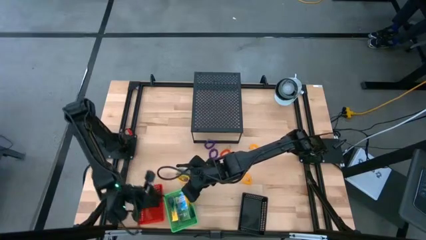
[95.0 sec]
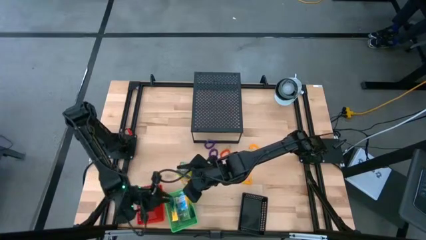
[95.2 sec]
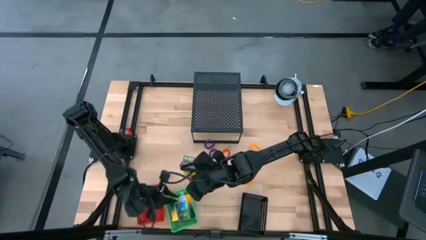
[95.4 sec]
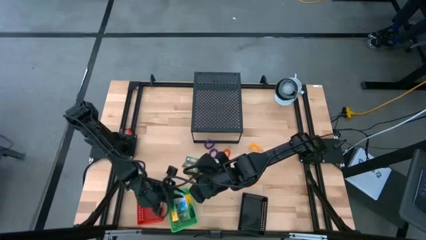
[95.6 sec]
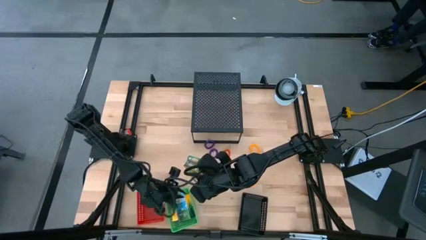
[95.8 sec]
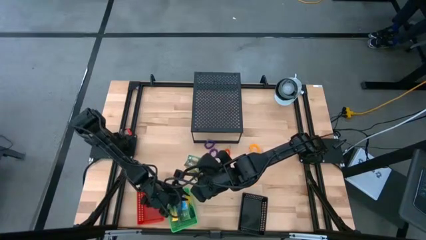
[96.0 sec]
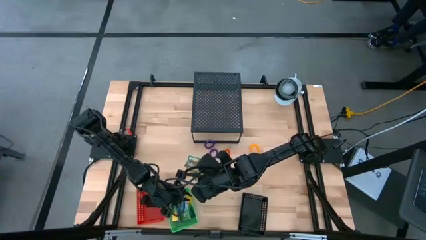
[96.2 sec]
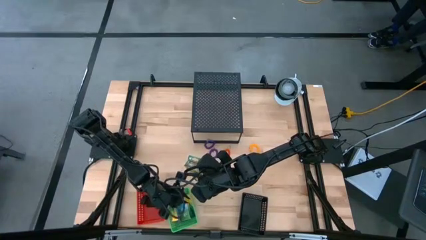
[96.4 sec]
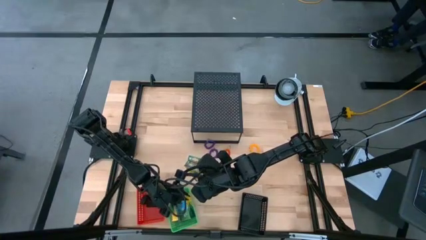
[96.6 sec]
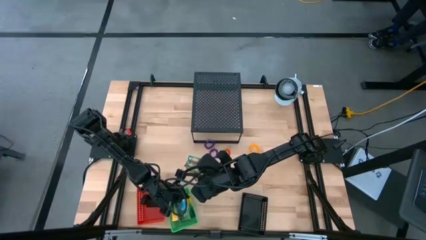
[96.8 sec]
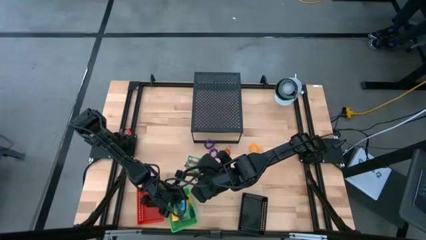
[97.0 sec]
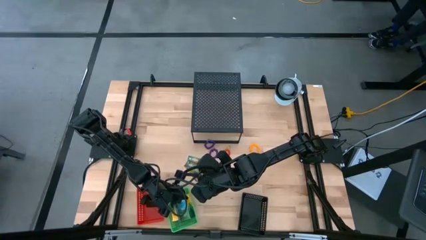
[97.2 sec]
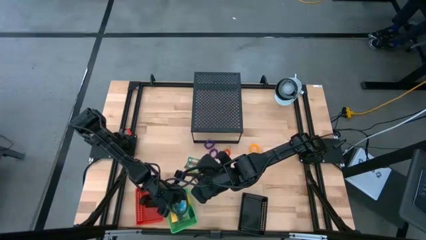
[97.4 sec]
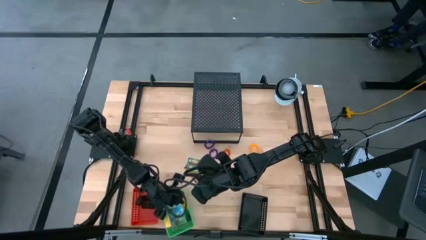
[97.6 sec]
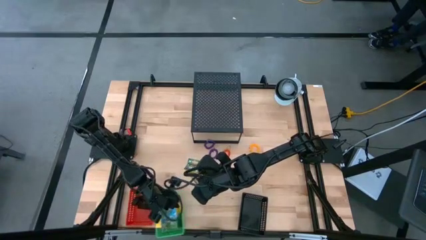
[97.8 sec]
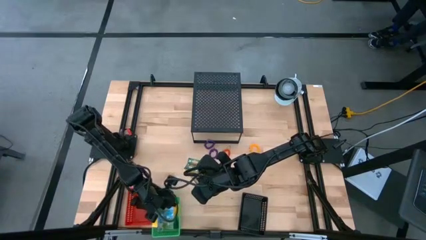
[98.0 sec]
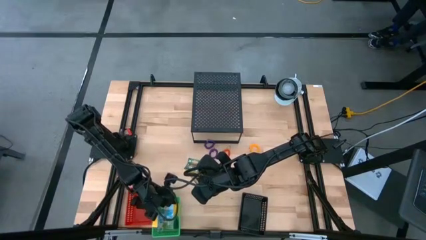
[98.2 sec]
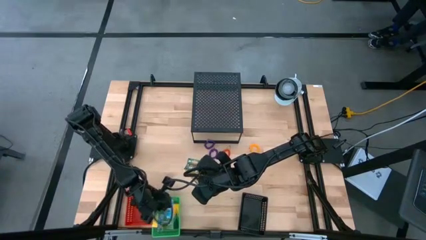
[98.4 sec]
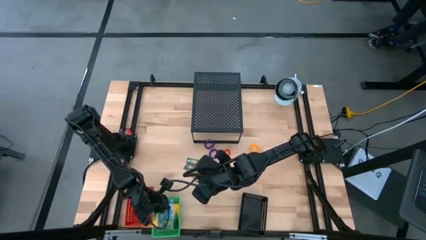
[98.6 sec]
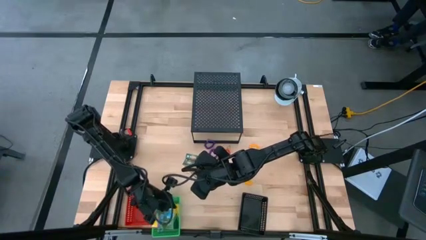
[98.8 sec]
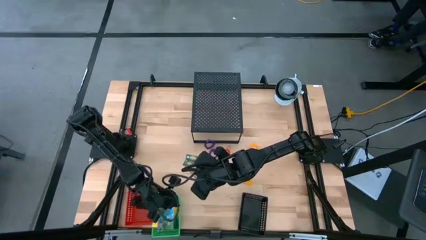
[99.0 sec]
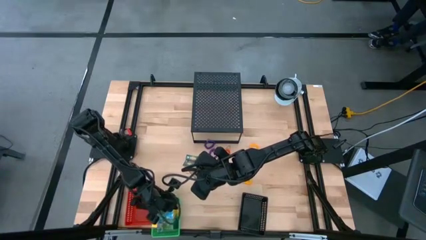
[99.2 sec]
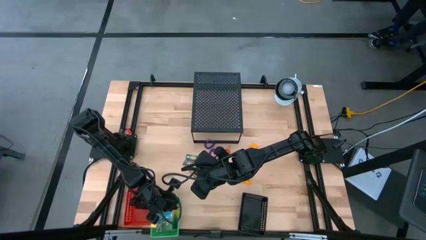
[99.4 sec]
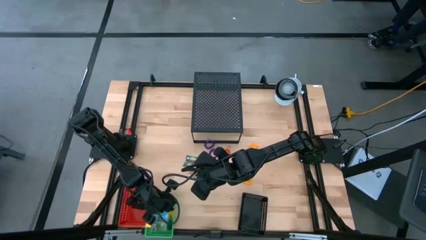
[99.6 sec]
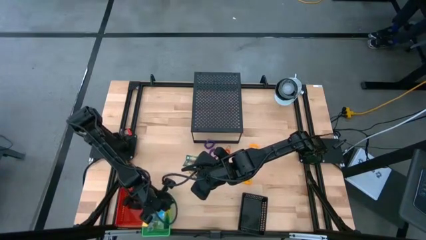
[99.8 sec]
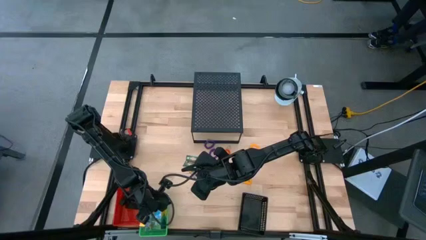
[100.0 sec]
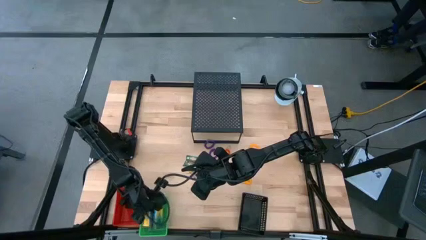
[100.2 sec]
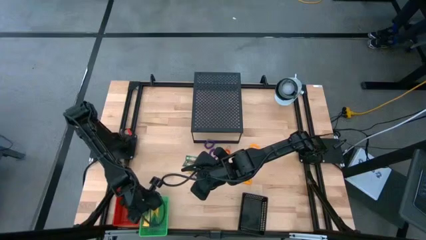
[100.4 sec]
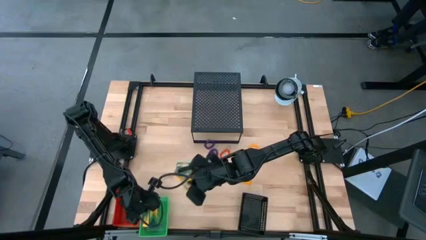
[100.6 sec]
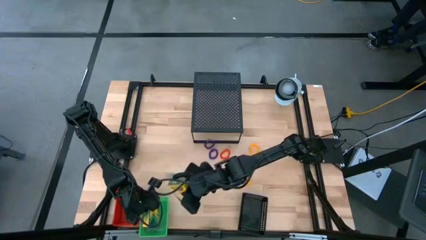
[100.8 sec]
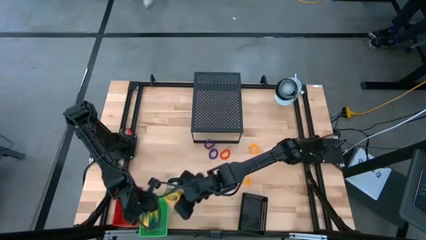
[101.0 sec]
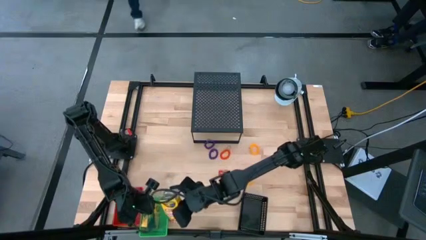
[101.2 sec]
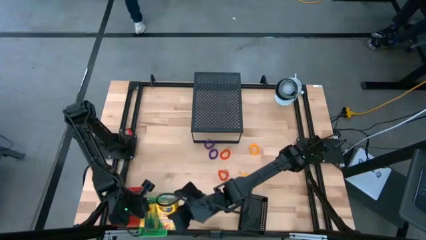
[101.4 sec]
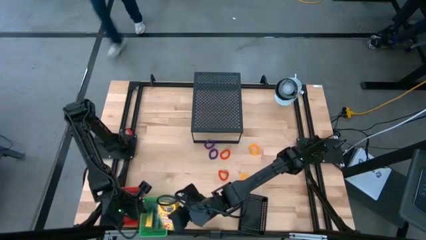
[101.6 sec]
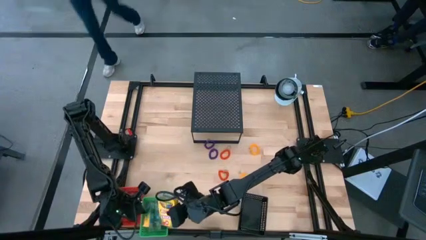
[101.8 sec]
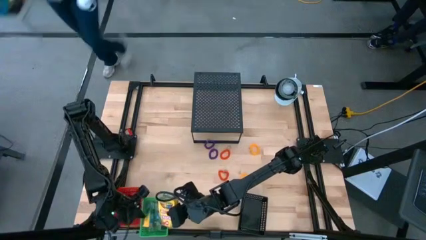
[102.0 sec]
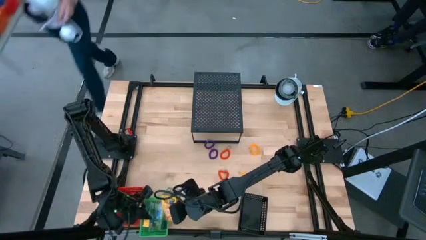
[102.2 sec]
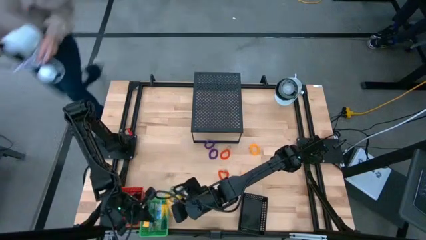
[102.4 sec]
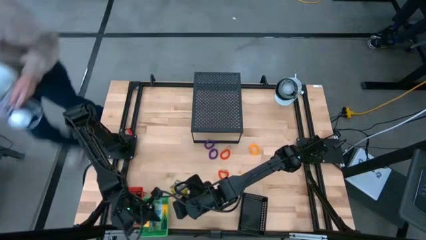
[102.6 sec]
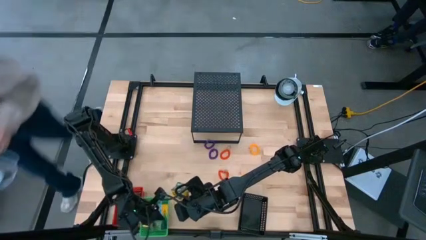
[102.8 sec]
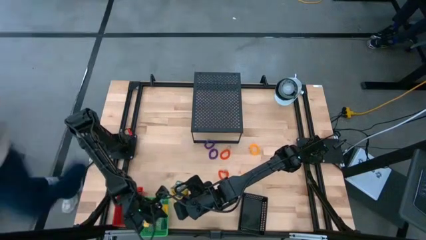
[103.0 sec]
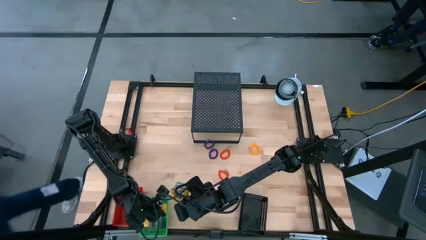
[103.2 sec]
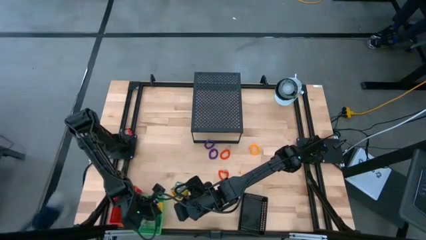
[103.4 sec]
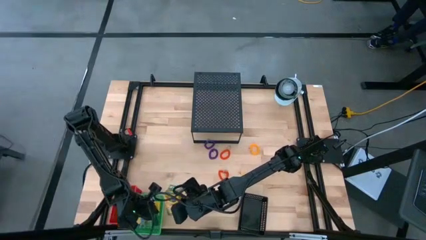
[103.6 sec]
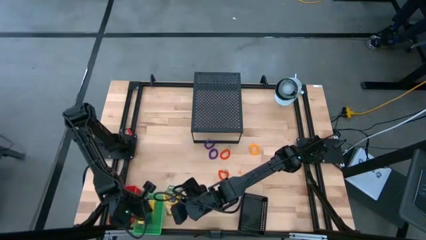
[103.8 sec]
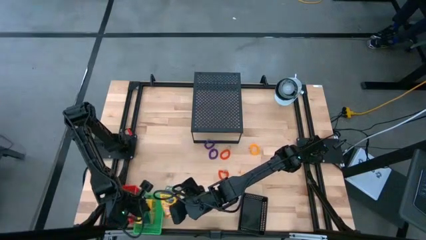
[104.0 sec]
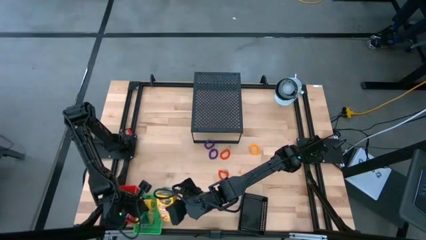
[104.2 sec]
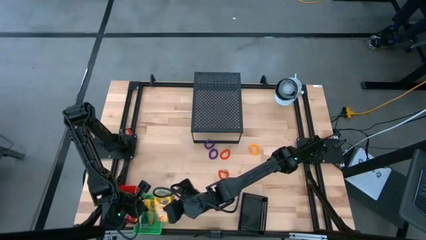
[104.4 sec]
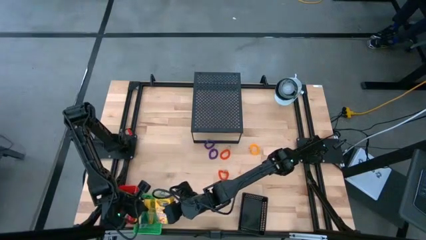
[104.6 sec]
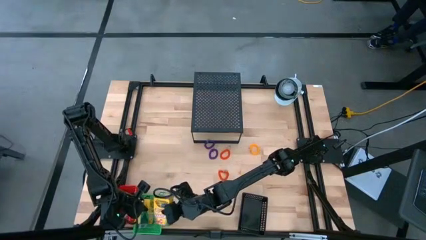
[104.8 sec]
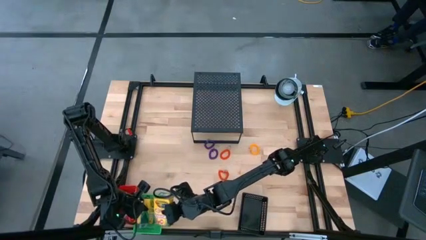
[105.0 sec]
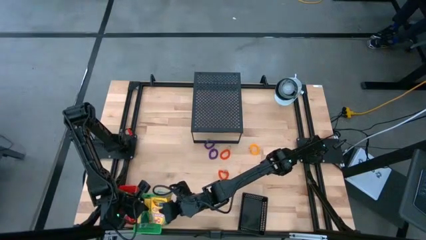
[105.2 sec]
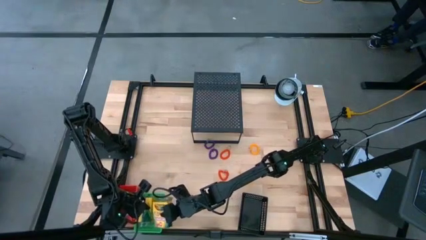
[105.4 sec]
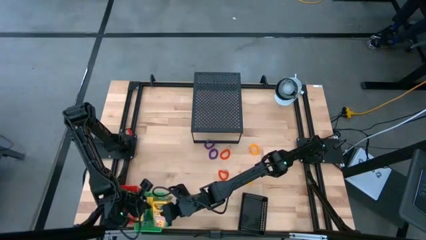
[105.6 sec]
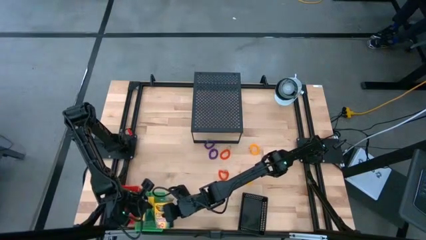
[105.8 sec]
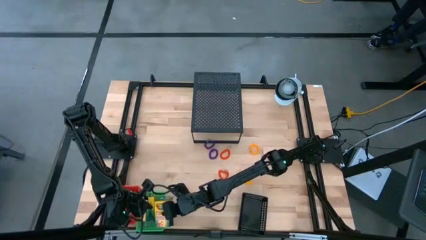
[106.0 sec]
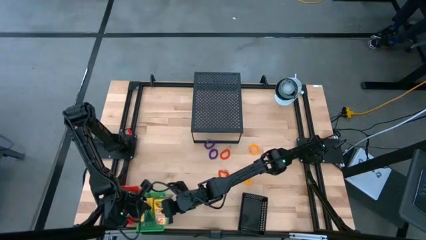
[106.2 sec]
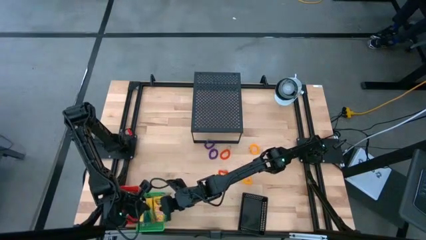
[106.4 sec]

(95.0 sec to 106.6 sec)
Task: Pick & Place Office Desk Supplies
Put the crayon box into the green bin
